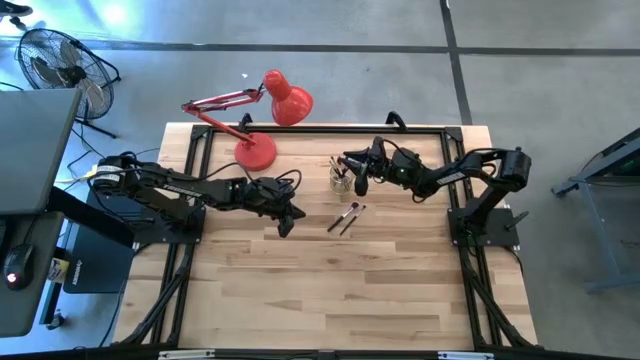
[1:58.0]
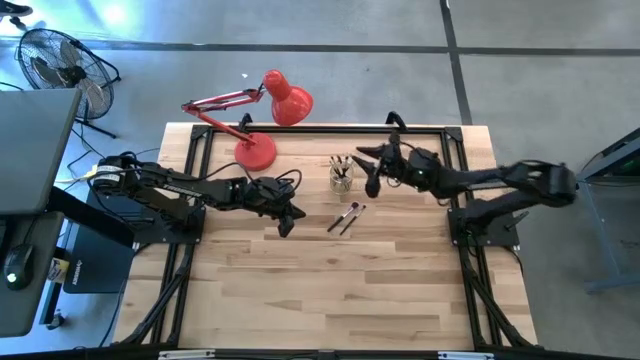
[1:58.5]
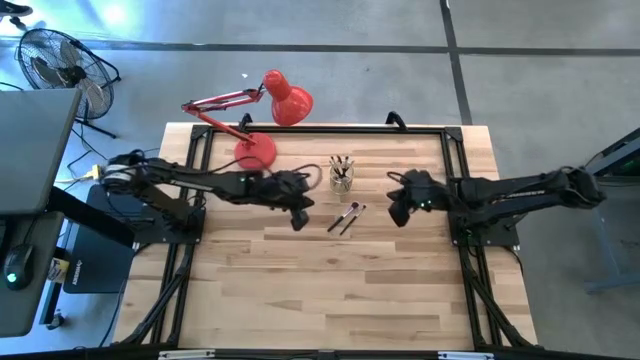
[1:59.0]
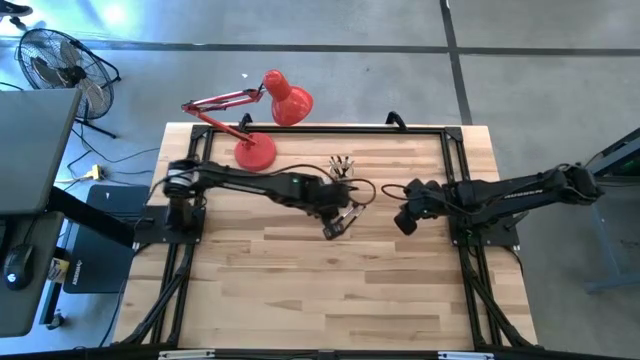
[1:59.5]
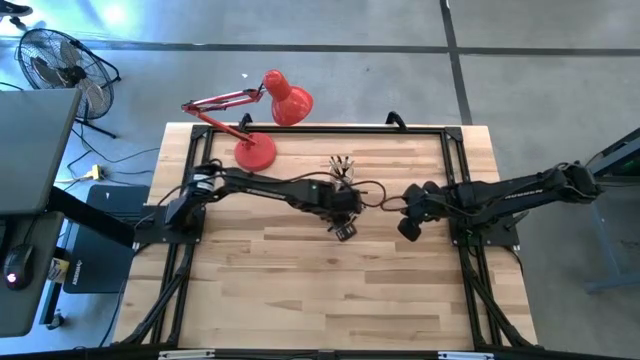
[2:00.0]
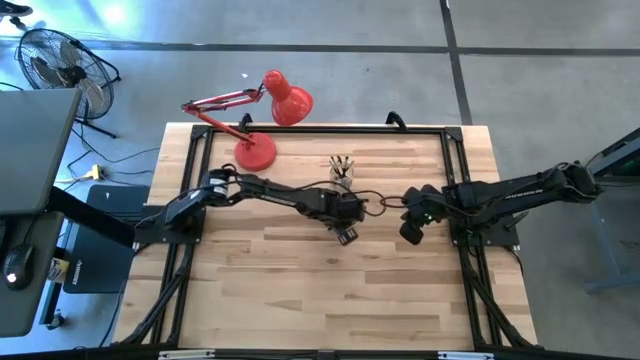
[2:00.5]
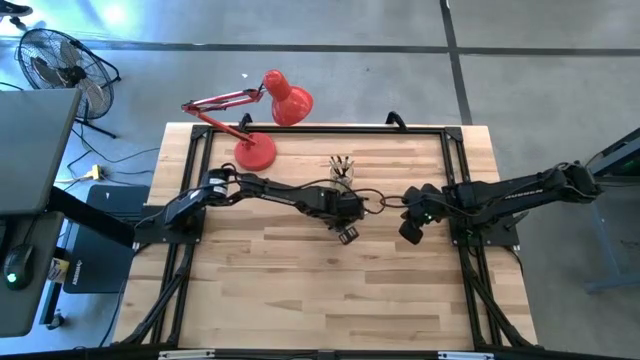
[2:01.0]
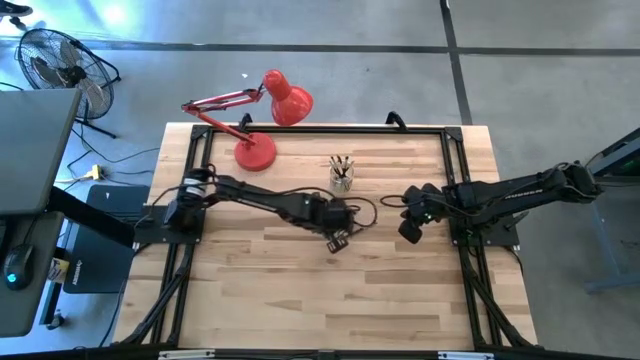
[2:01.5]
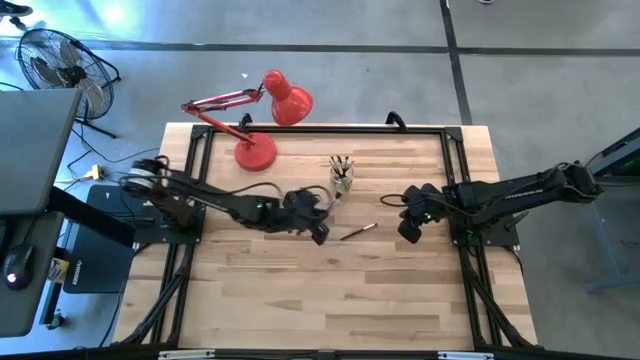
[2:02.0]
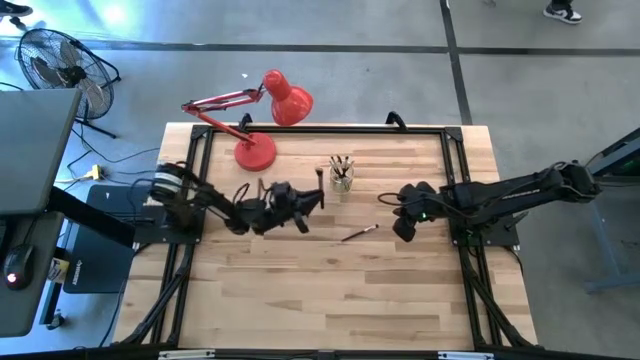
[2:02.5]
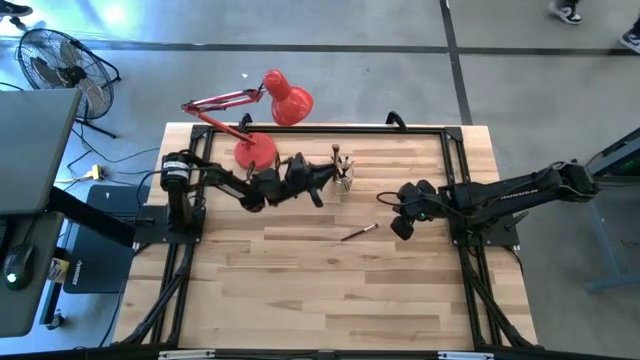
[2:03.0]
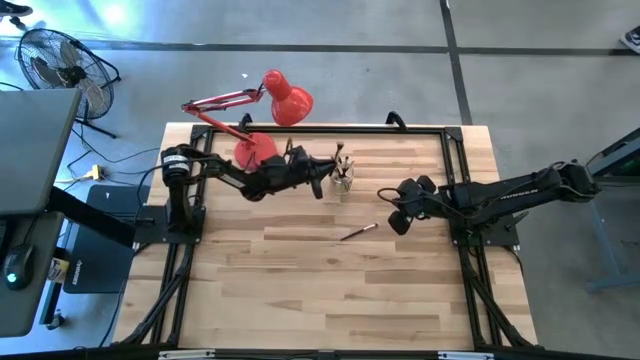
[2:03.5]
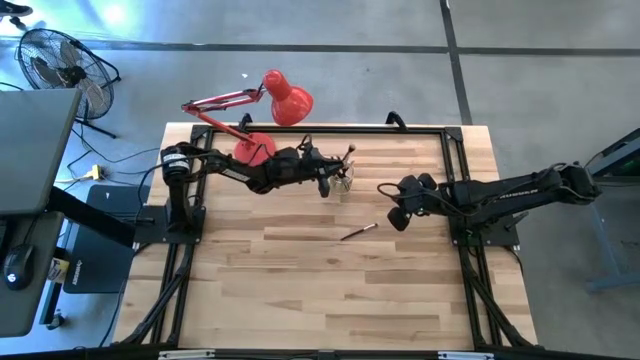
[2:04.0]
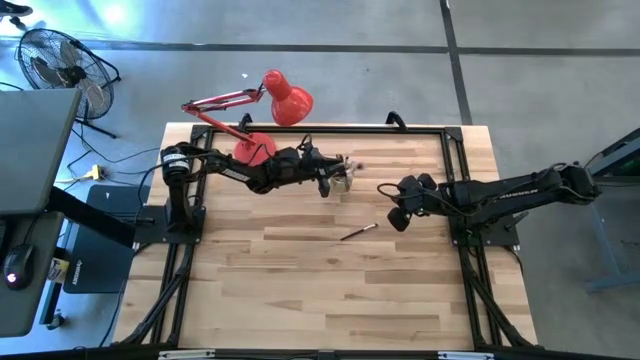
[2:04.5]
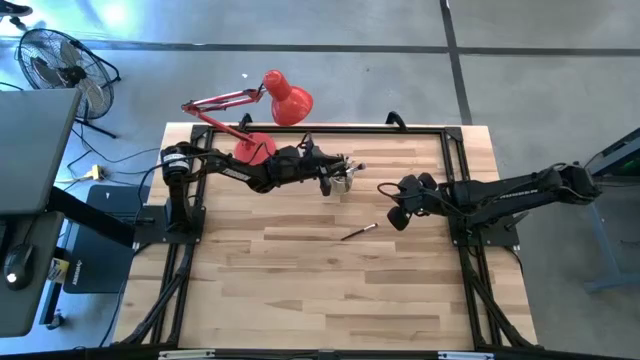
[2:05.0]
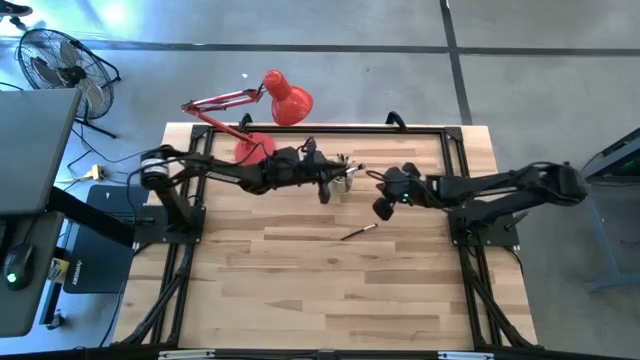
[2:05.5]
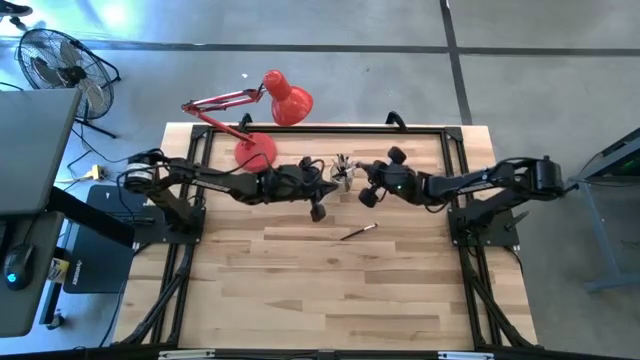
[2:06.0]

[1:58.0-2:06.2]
Task: Put items in baskets/containers
Put the makeup brush into the wire bin

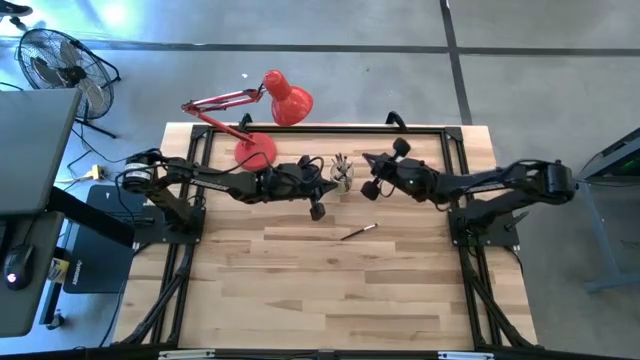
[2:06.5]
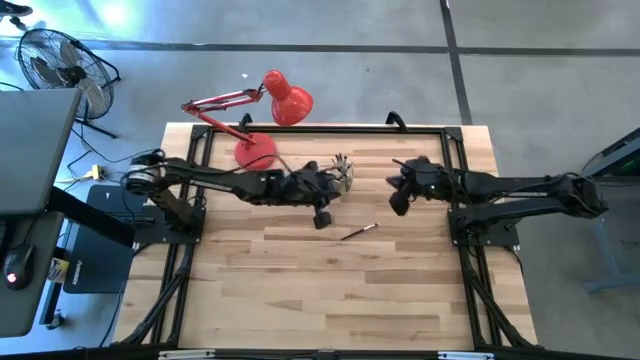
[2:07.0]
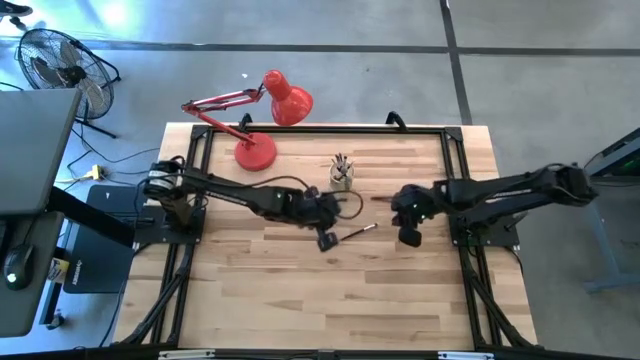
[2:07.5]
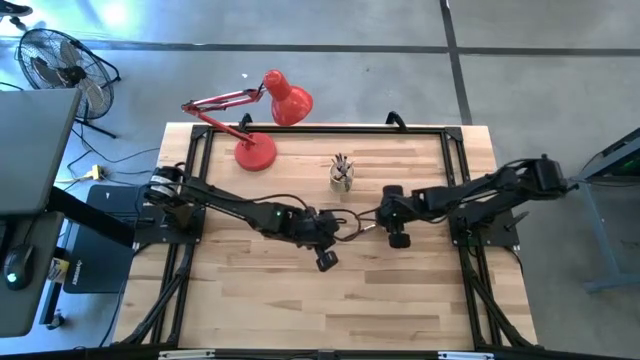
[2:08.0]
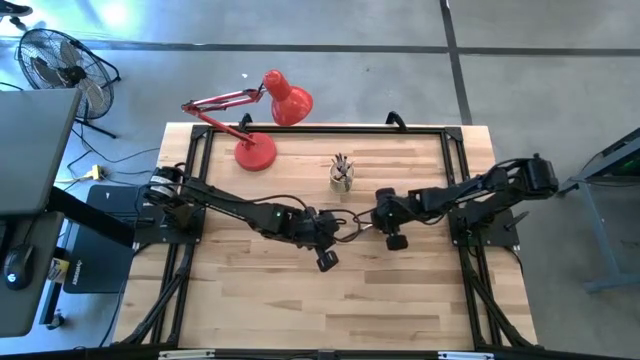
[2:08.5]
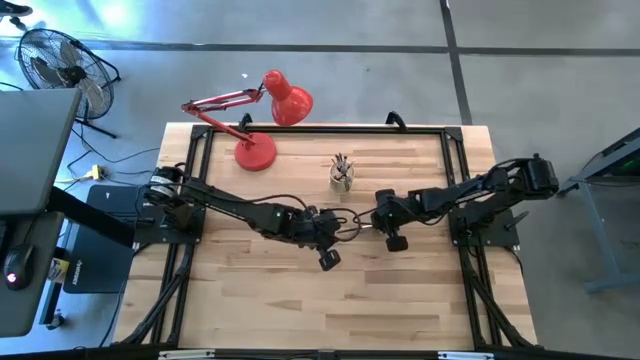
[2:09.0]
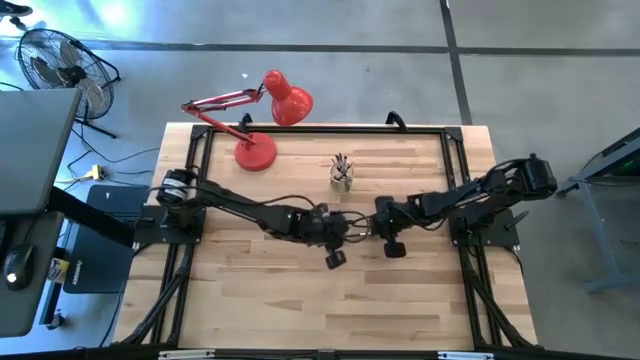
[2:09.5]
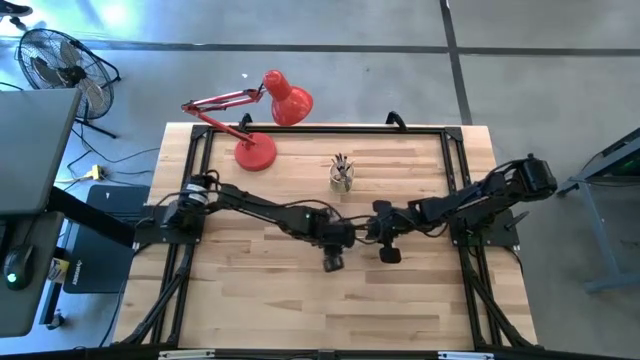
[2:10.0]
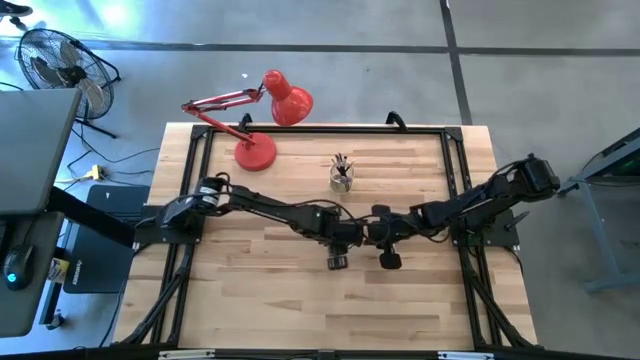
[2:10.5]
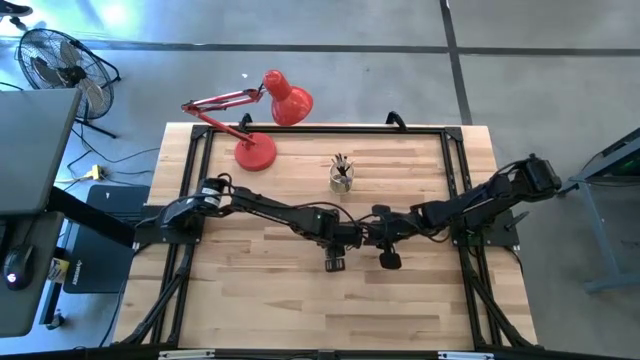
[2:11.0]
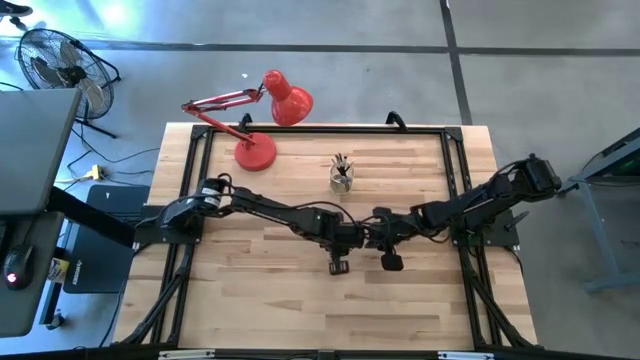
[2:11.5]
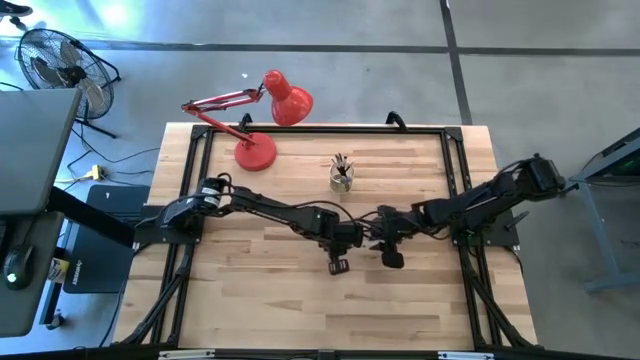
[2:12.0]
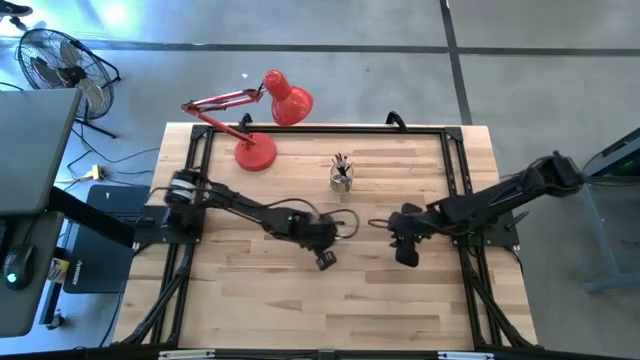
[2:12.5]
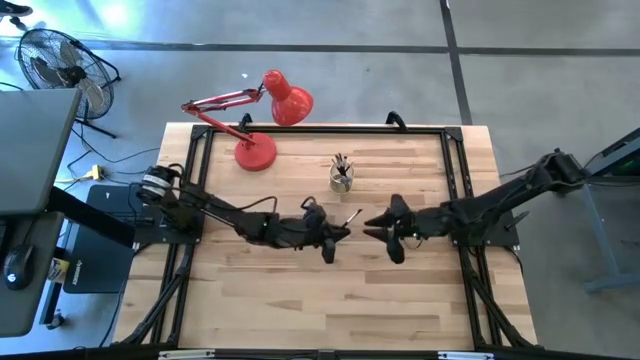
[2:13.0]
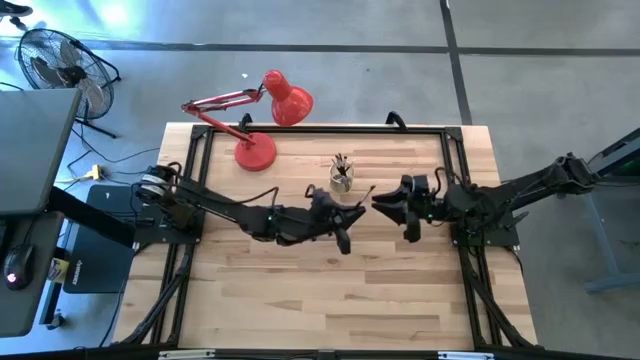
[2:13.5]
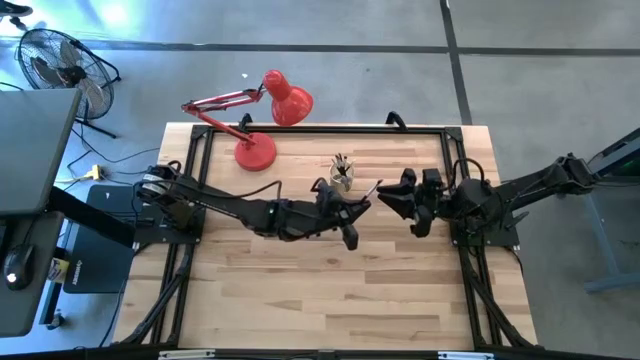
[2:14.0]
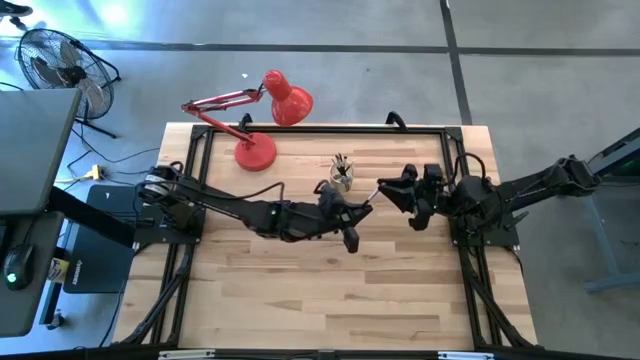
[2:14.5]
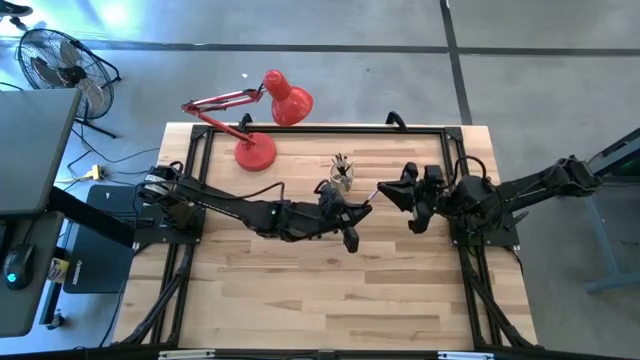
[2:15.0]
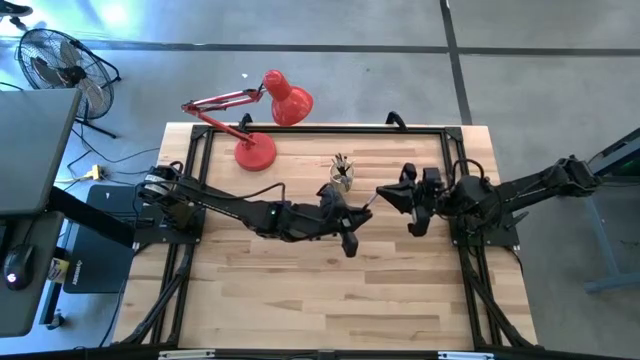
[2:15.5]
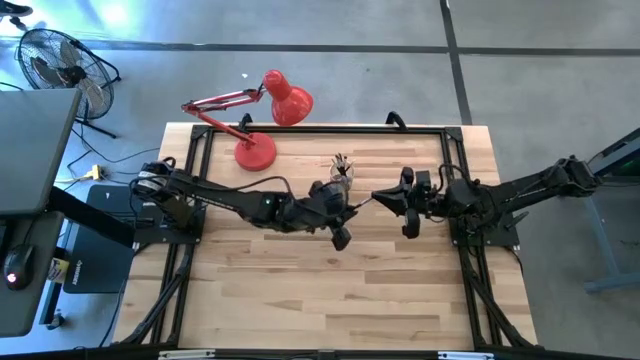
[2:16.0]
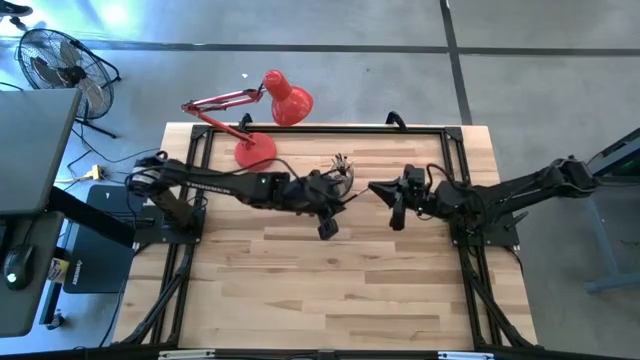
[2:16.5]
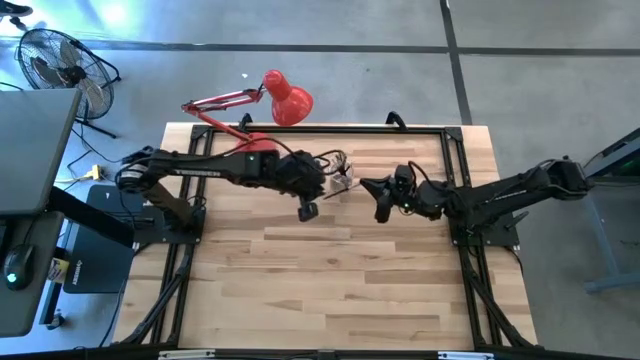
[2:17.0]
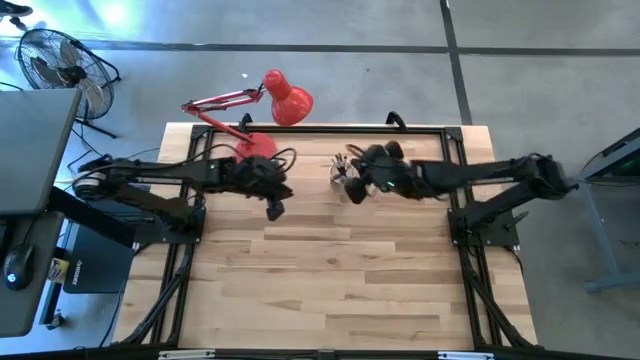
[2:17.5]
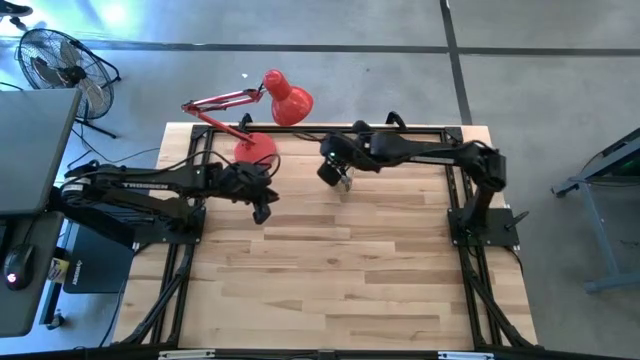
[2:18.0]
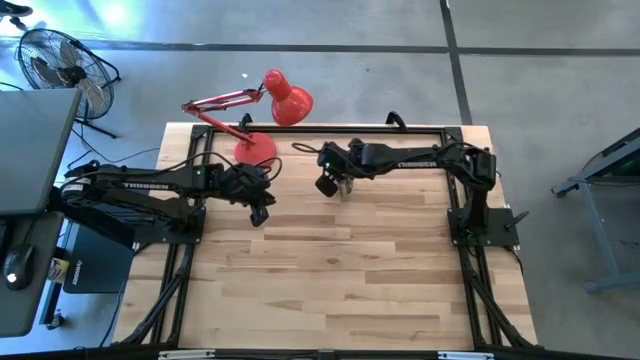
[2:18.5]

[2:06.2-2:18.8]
Put the makeup brush into the wire bin
